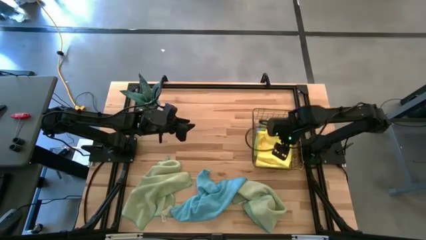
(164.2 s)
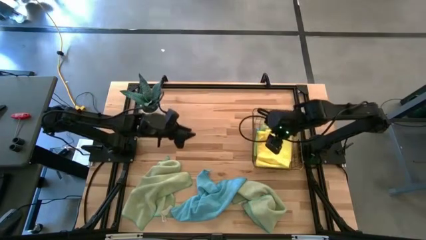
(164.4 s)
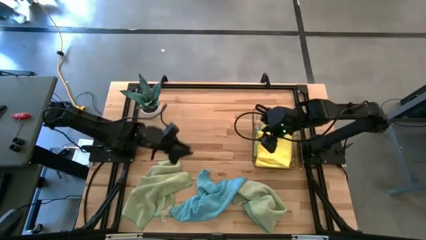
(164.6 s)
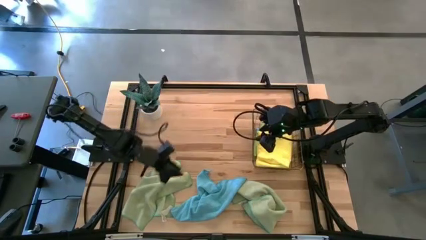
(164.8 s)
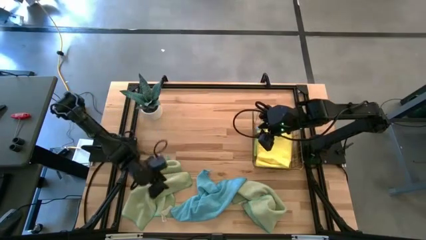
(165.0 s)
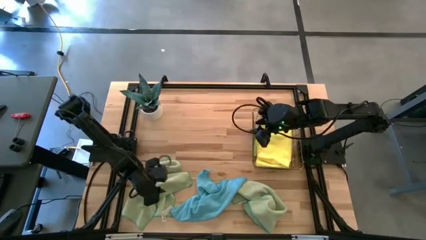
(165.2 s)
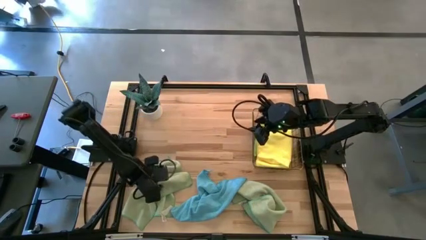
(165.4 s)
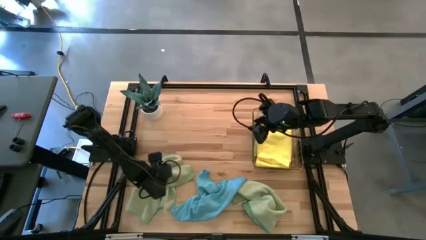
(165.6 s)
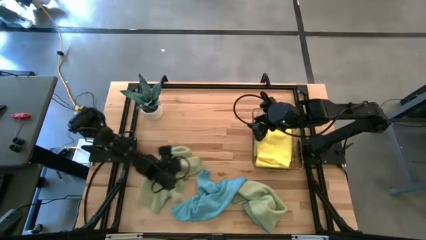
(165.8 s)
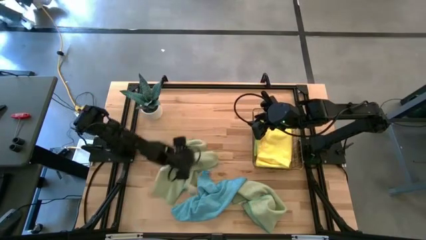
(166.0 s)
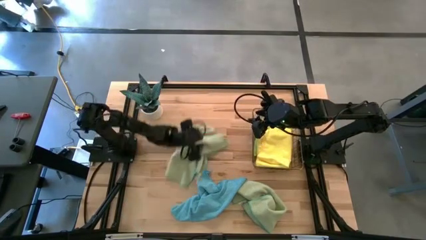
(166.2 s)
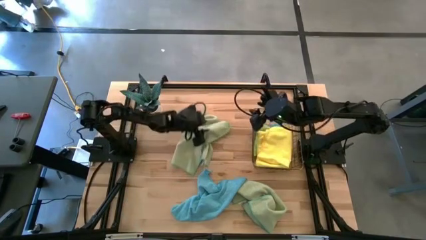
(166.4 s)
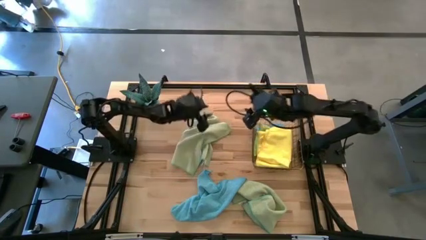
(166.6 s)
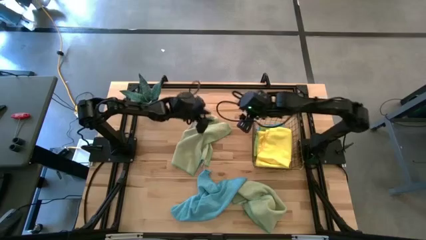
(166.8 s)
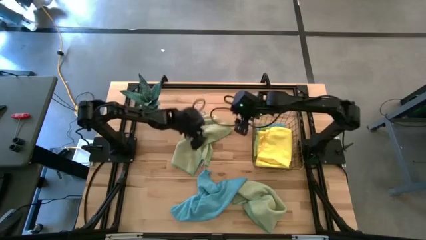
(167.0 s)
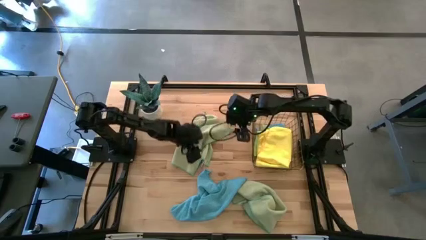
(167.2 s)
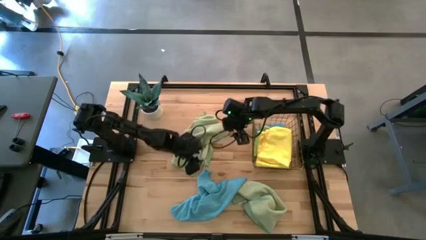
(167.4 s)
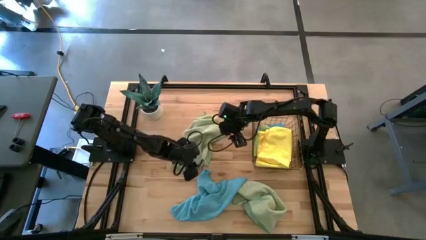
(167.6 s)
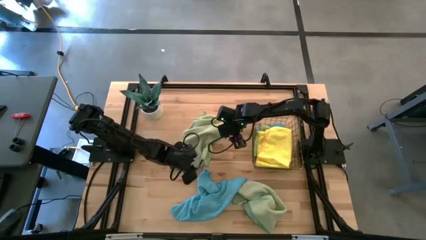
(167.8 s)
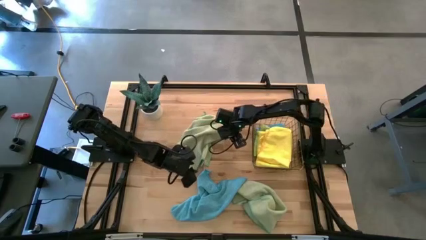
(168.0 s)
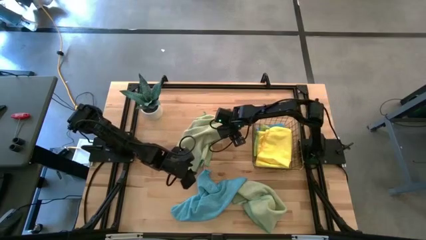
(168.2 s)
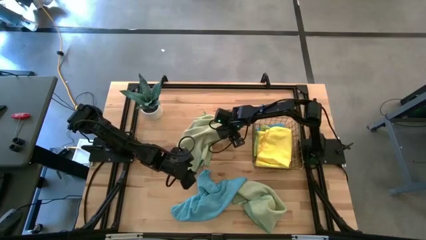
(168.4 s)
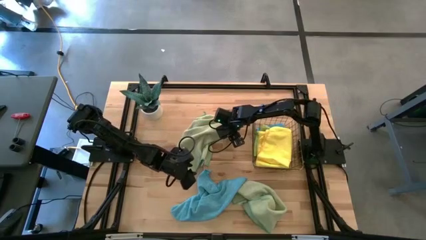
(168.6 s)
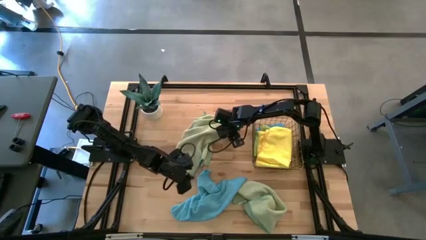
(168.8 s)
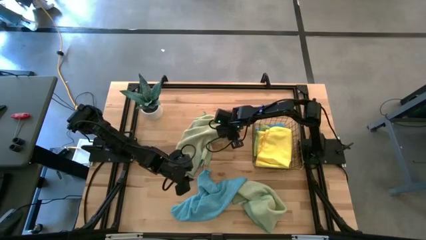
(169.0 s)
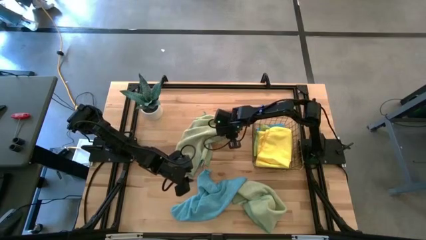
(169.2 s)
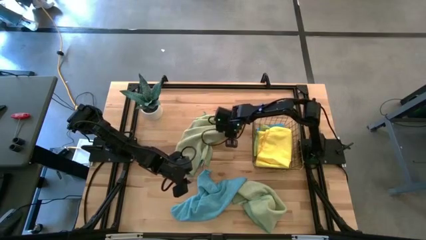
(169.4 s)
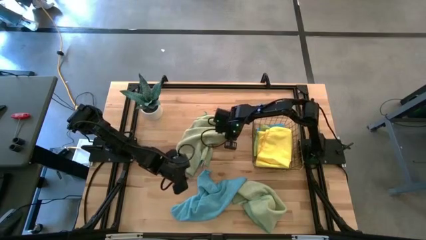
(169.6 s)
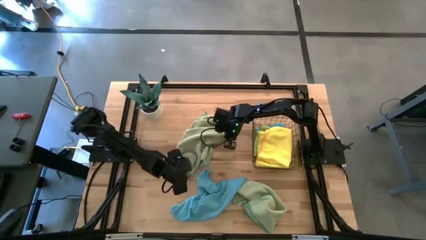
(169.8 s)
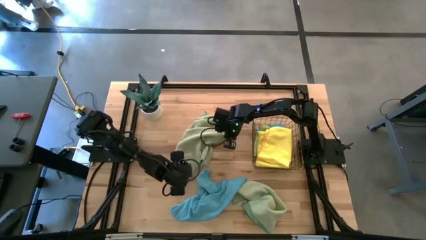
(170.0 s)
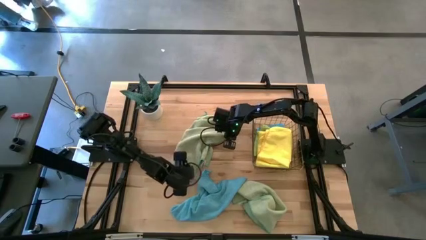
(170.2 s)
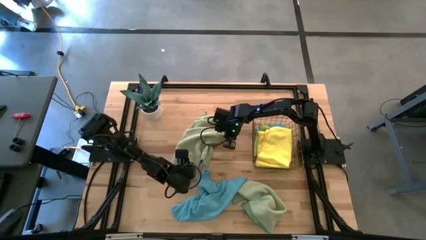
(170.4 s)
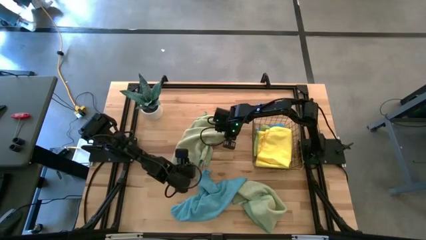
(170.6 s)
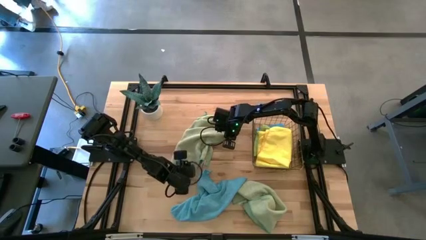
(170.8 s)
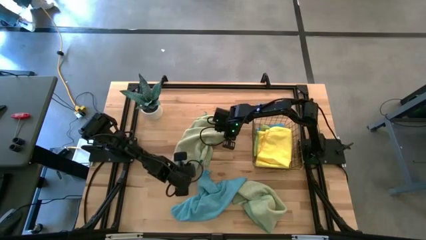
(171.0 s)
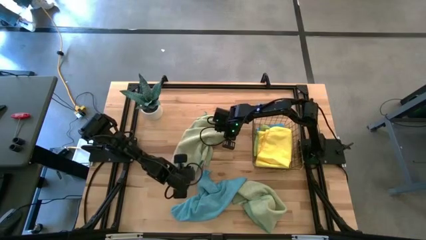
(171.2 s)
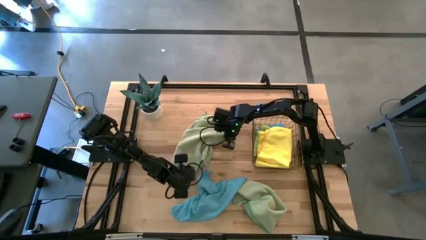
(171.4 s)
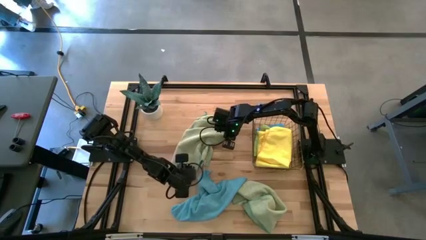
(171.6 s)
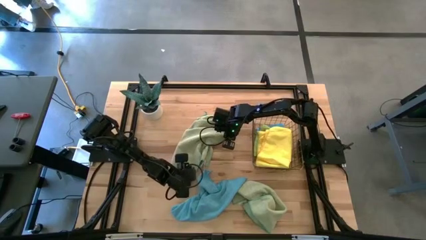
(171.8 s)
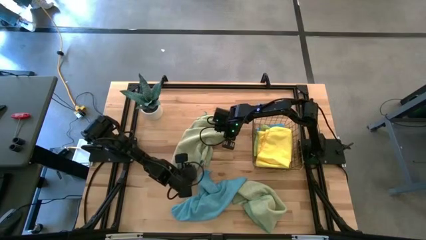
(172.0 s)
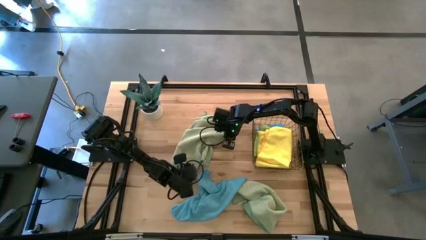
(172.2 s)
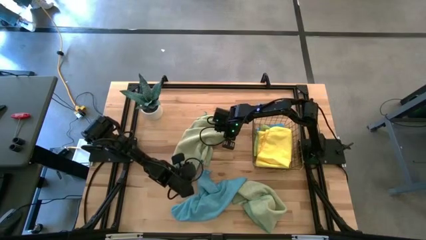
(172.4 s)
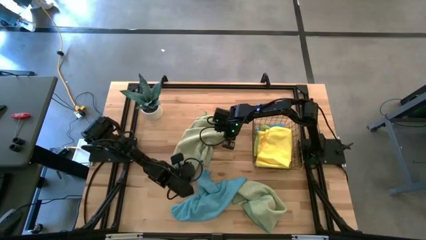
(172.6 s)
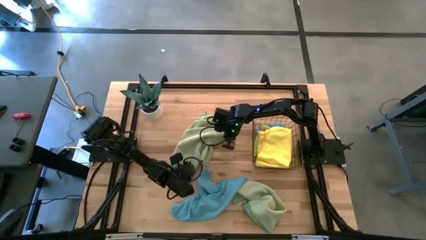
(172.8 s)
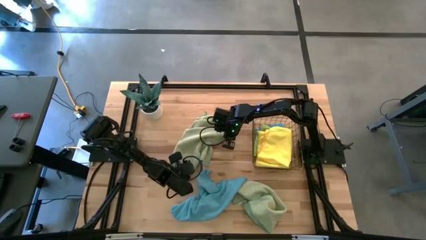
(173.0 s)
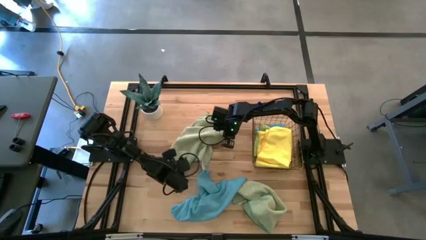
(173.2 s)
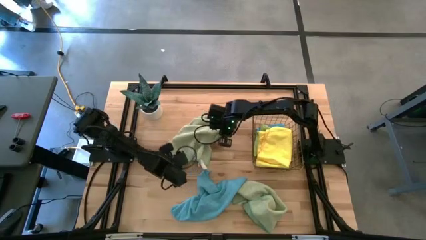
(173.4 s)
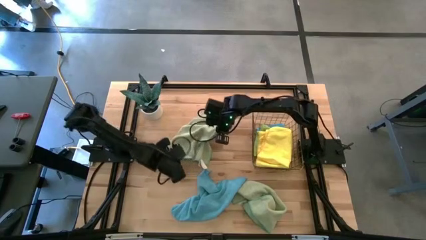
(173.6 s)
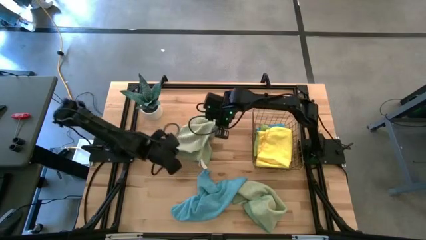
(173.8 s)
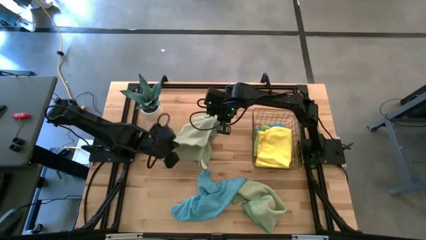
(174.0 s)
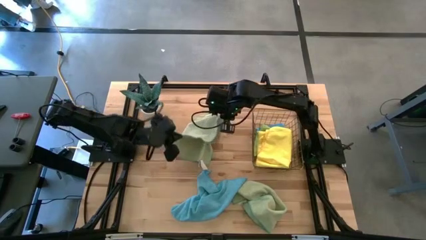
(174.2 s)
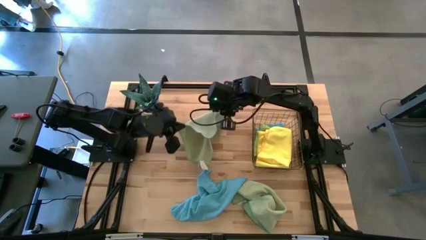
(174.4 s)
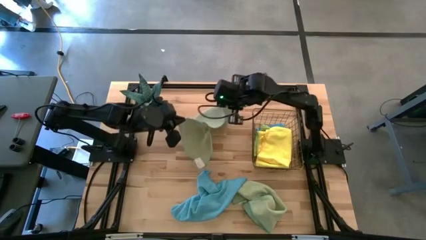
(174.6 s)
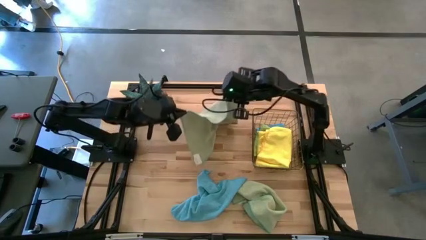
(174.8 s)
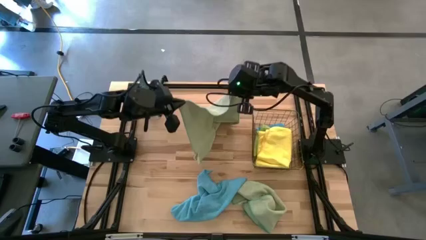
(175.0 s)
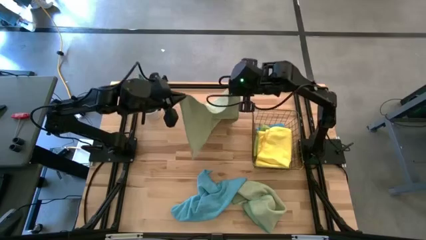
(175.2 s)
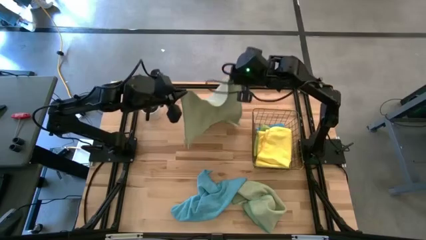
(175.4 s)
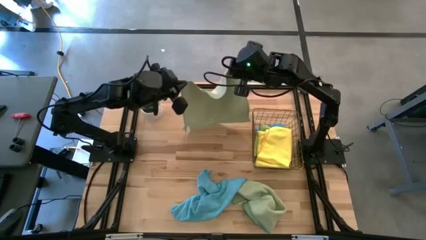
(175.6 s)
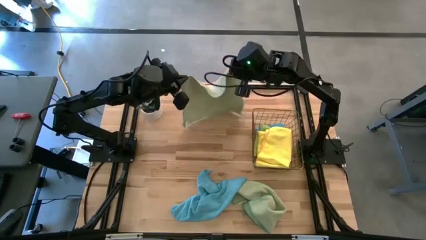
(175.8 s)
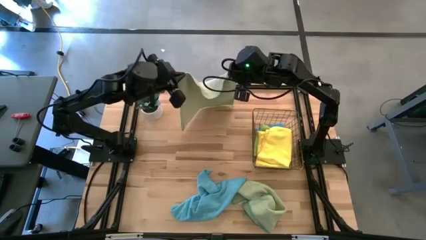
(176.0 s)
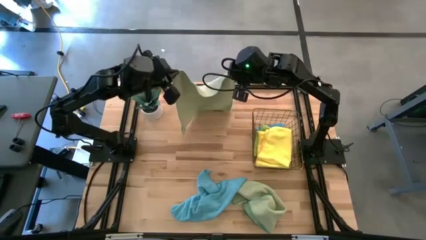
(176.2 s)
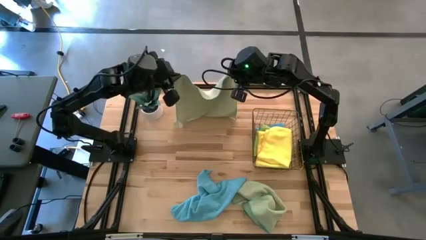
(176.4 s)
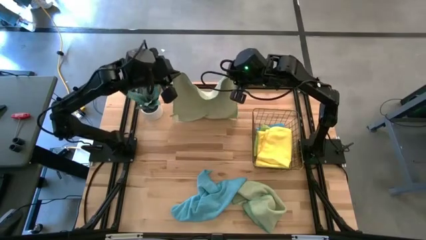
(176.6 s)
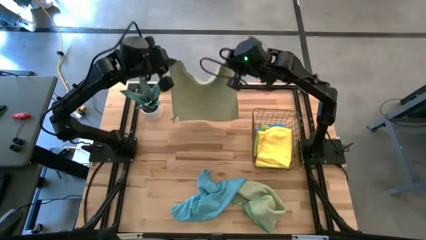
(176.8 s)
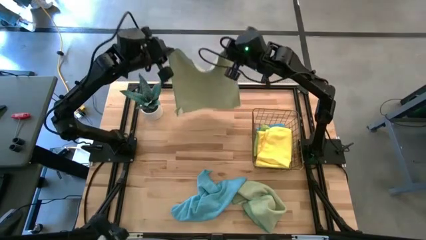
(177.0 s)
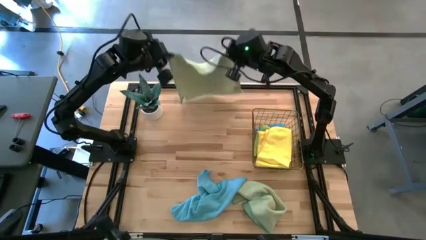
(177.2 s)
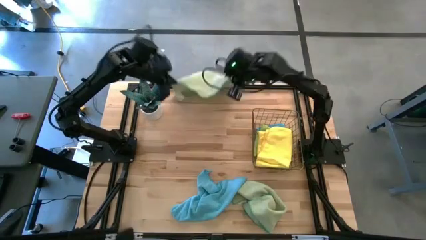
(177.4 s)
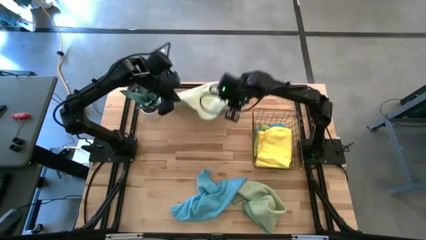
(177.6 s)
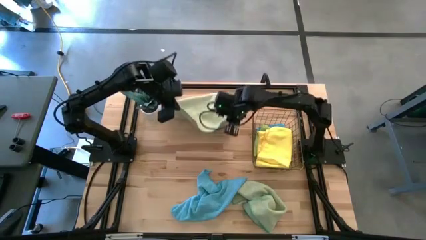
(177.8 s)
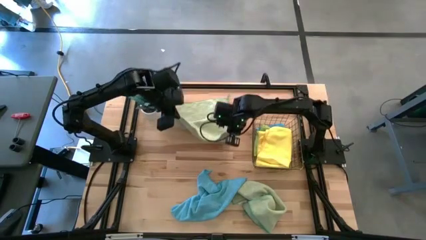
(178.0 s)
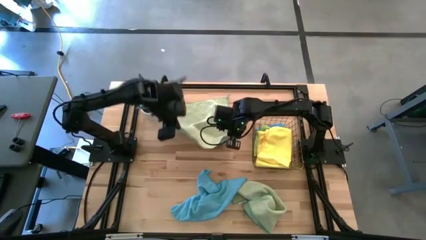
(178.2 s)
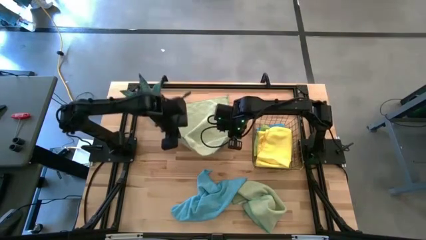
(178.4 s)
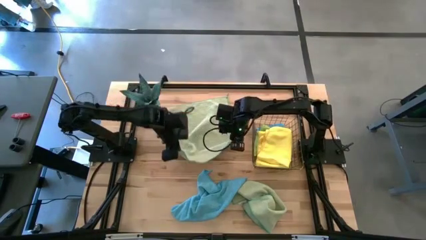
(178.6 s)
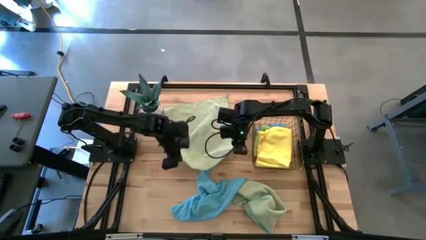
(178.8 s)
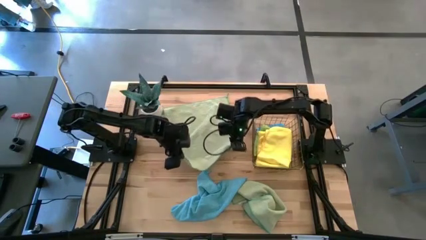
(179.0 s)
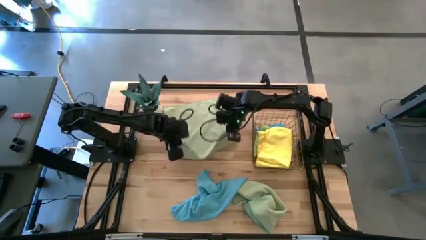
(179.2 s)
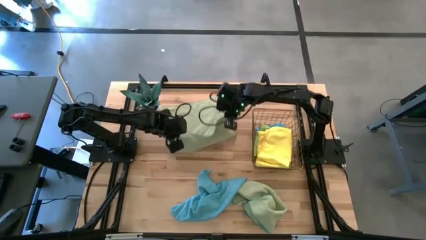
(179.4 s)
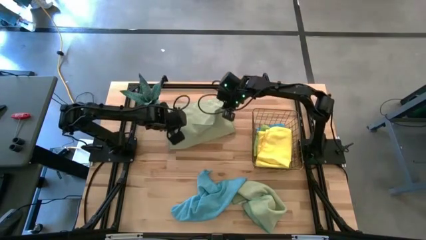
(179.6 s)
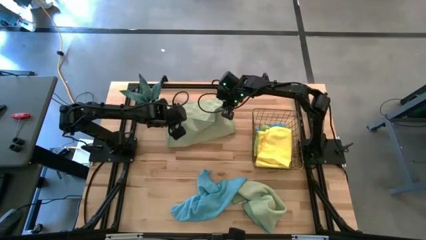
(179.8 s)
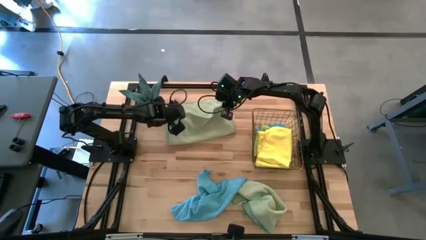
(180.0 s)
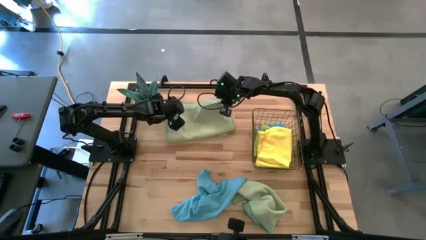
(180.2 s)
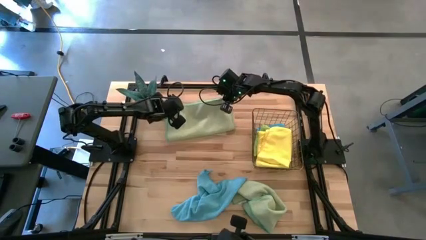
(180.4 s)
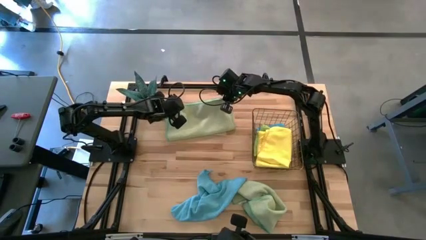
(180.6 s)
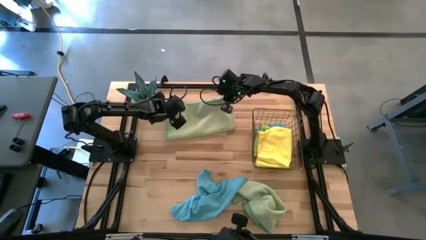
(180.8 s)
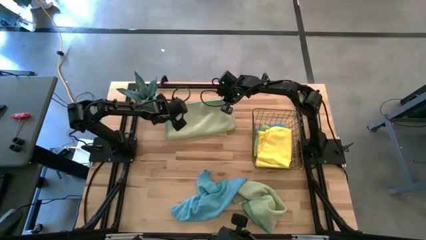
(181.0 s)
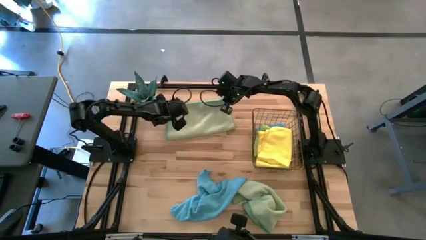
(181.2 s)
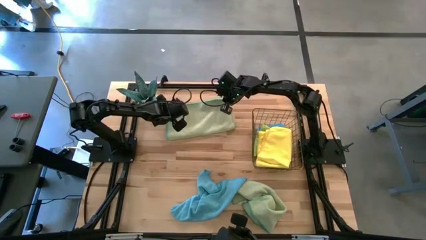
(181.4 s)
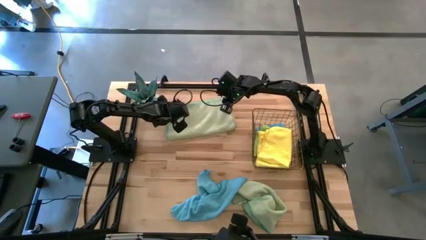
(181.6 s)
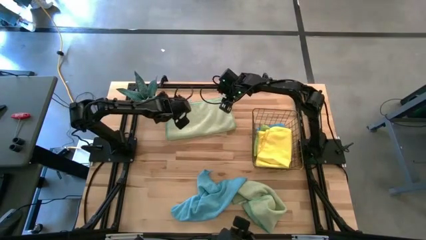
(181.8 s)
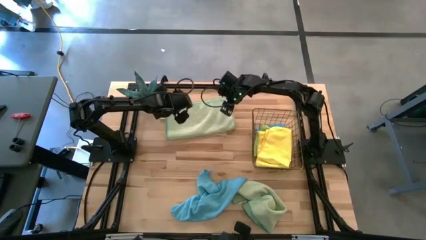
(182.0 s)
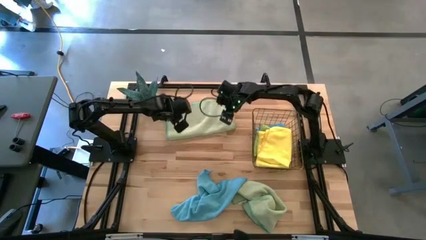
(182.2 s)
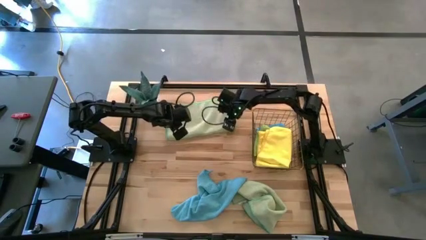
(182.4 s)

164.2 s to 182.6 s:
Task: Fold microfiber towels
Fold the left green microfiber cloth
